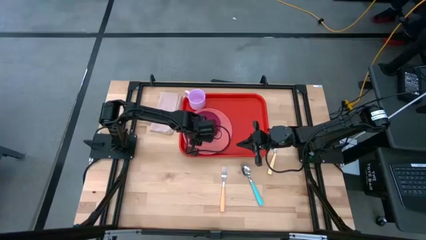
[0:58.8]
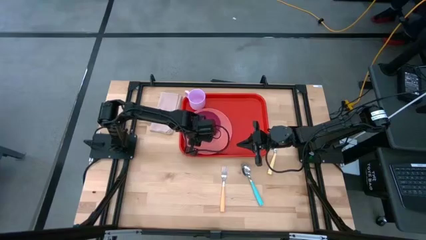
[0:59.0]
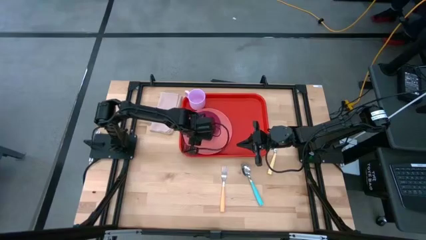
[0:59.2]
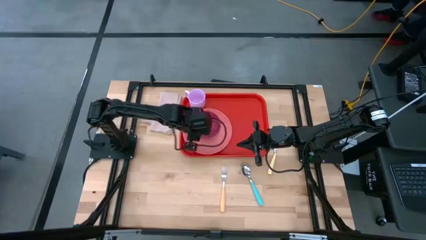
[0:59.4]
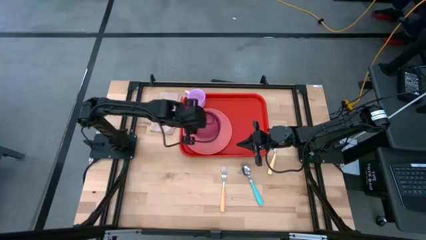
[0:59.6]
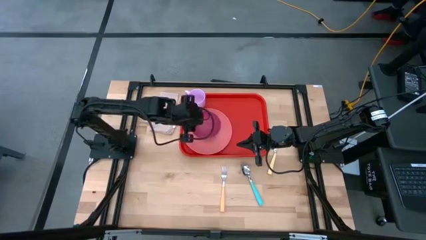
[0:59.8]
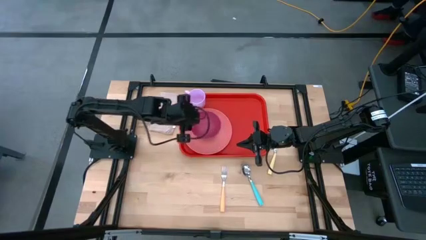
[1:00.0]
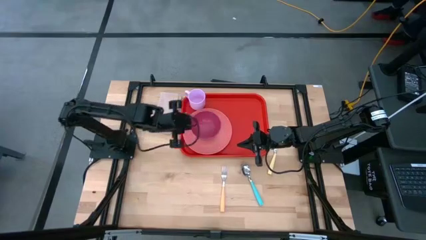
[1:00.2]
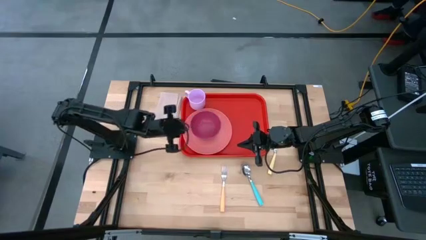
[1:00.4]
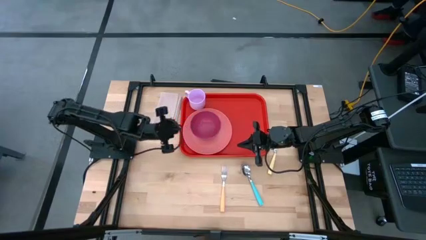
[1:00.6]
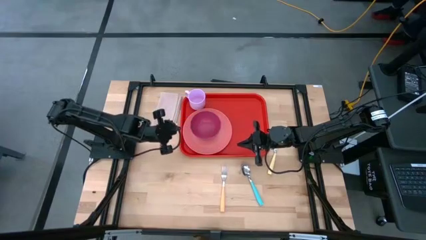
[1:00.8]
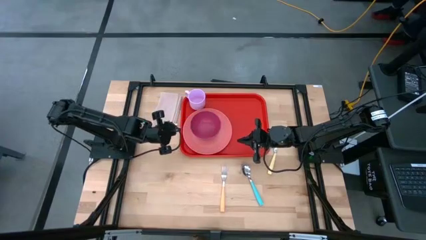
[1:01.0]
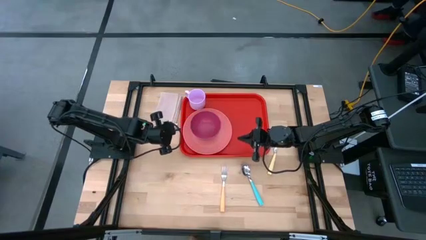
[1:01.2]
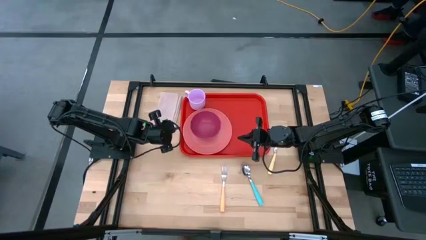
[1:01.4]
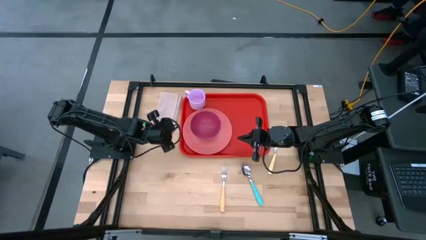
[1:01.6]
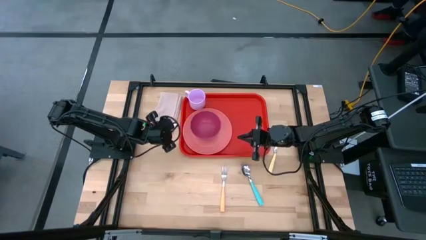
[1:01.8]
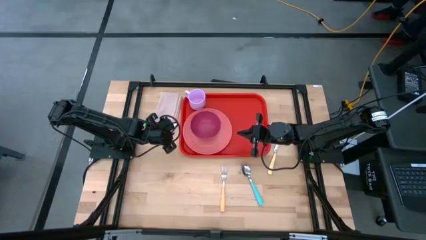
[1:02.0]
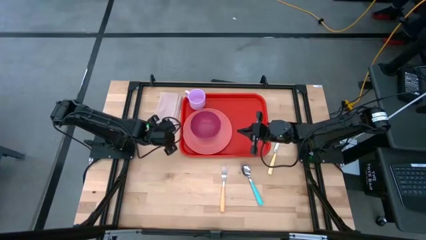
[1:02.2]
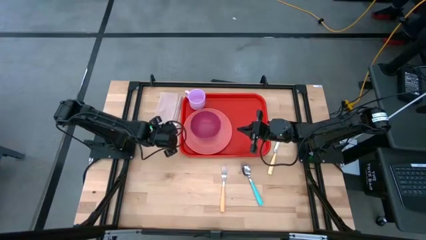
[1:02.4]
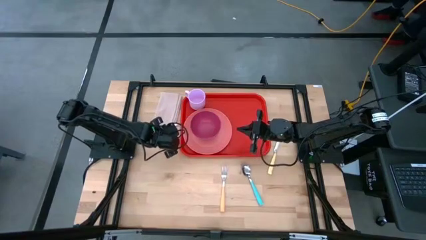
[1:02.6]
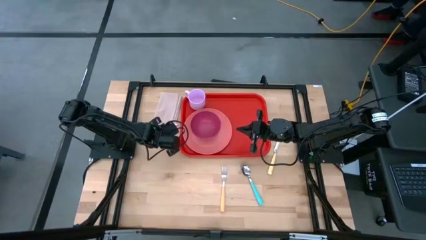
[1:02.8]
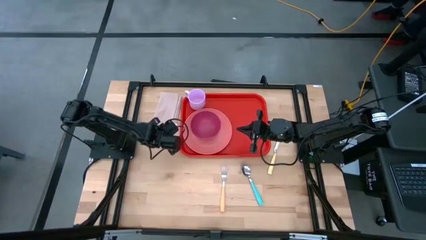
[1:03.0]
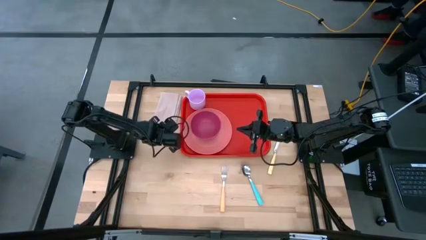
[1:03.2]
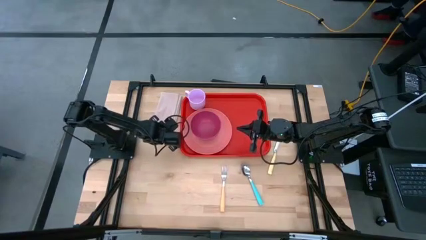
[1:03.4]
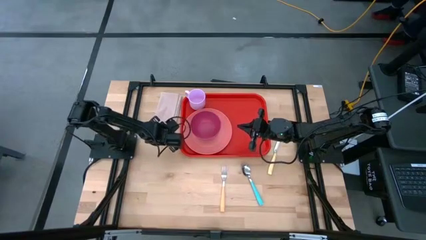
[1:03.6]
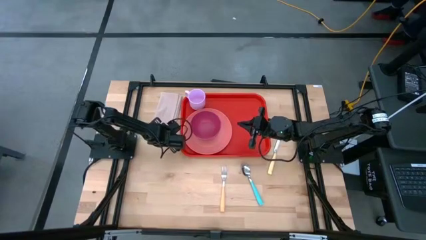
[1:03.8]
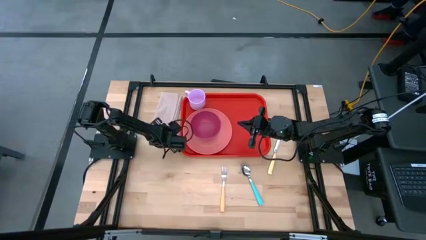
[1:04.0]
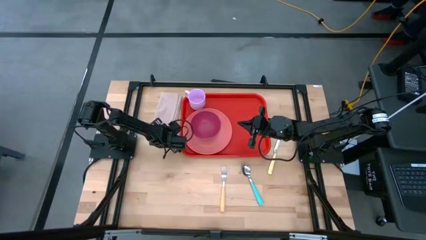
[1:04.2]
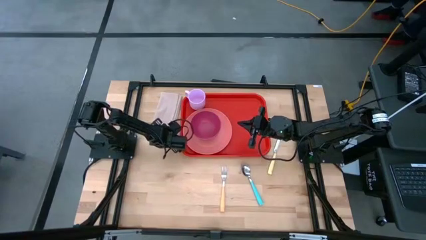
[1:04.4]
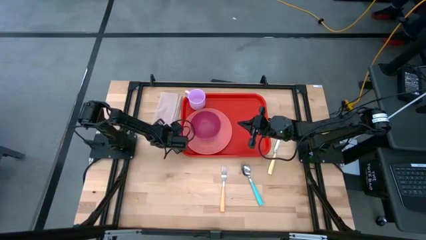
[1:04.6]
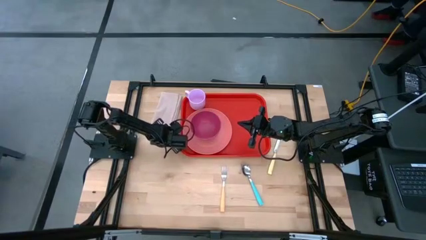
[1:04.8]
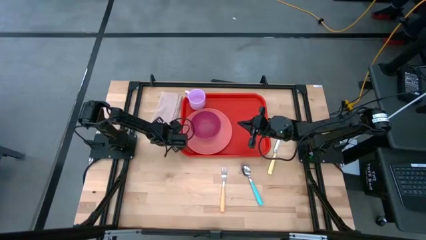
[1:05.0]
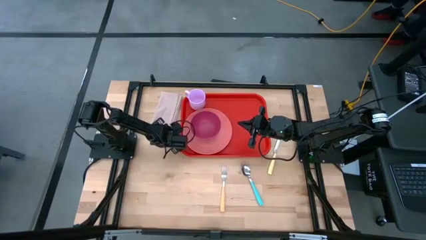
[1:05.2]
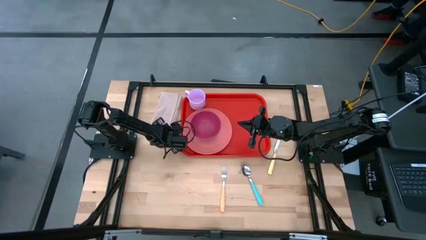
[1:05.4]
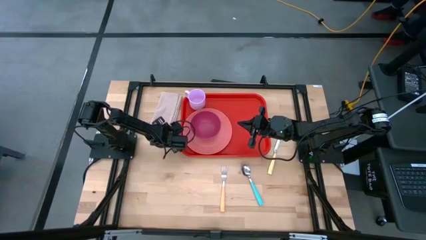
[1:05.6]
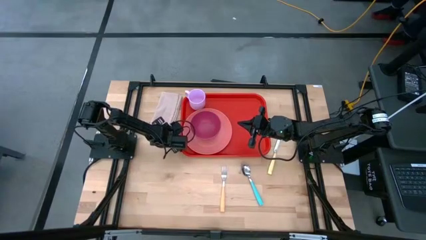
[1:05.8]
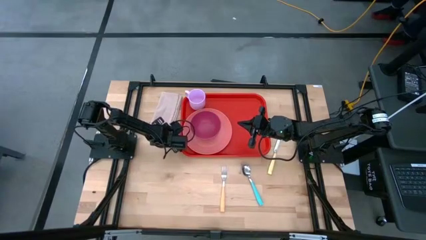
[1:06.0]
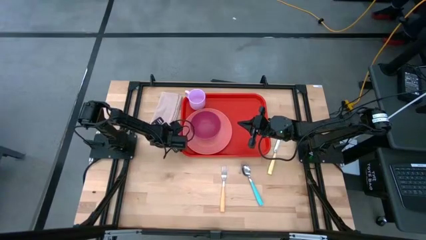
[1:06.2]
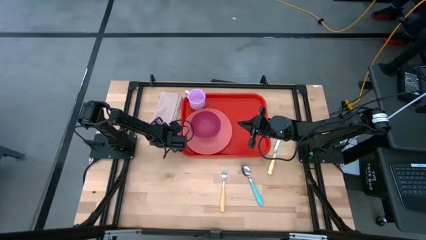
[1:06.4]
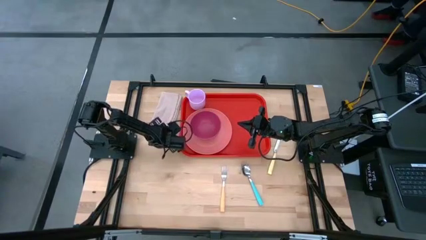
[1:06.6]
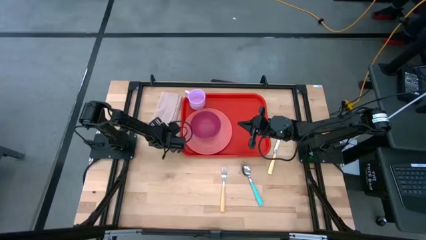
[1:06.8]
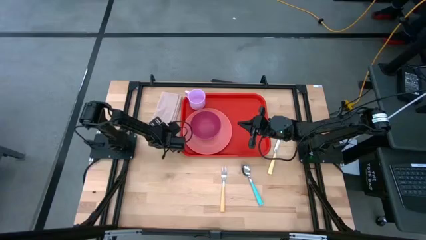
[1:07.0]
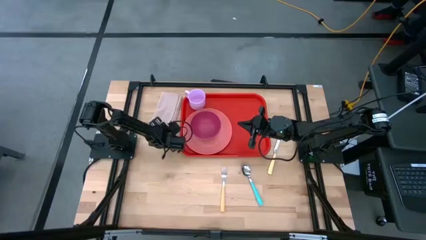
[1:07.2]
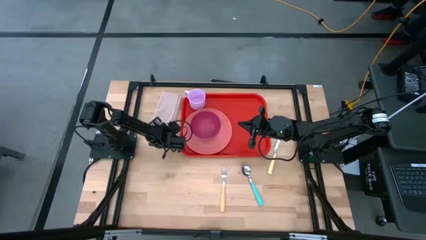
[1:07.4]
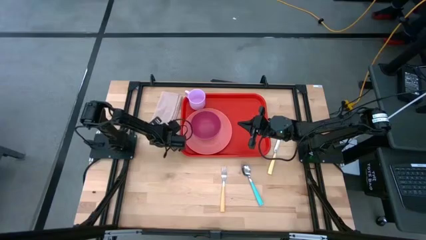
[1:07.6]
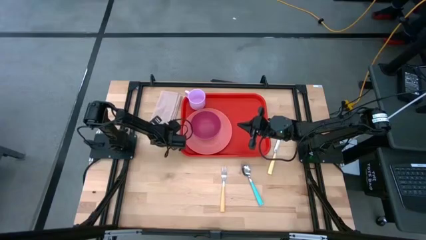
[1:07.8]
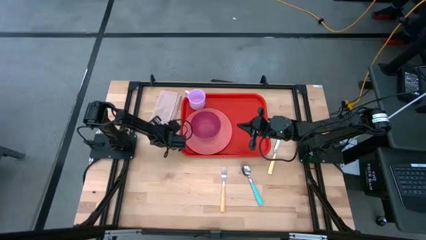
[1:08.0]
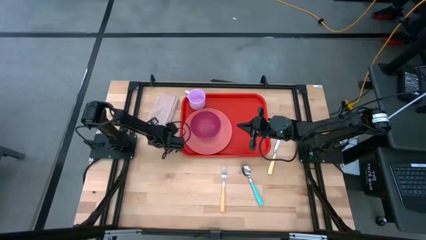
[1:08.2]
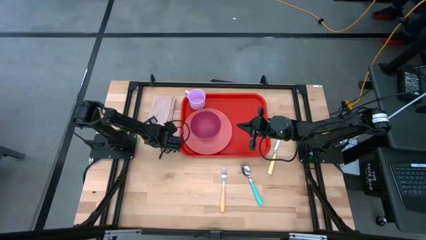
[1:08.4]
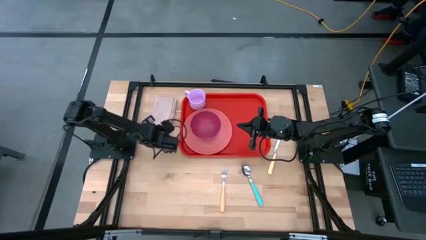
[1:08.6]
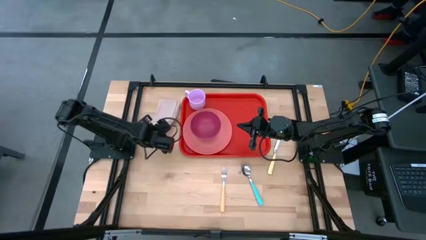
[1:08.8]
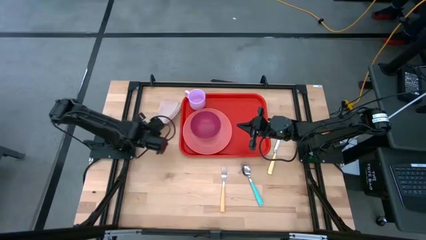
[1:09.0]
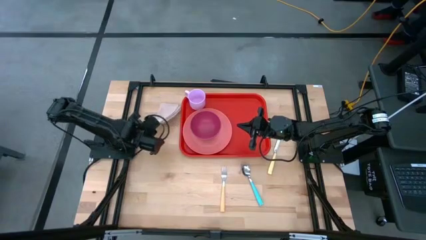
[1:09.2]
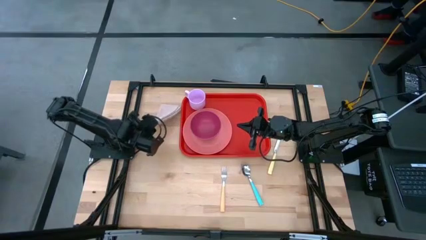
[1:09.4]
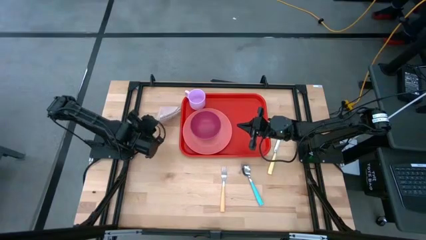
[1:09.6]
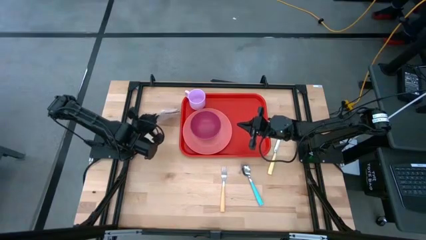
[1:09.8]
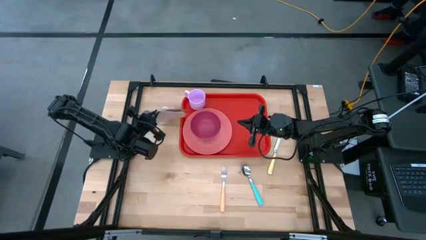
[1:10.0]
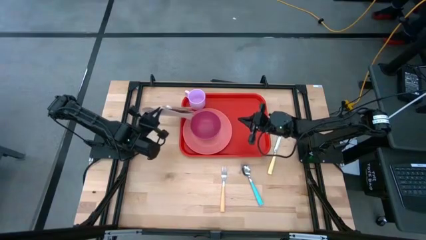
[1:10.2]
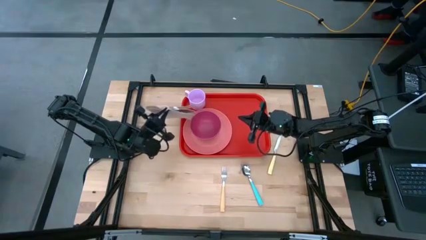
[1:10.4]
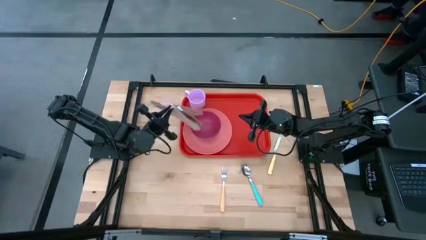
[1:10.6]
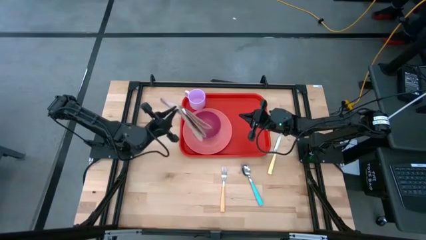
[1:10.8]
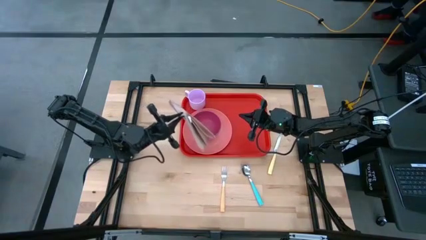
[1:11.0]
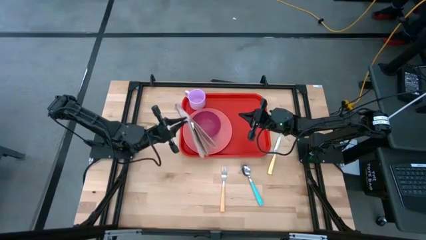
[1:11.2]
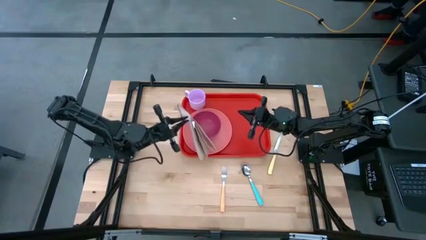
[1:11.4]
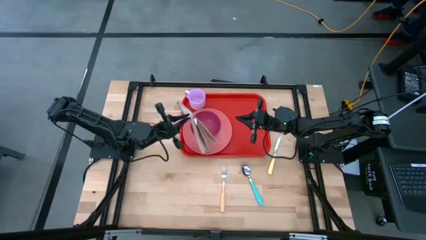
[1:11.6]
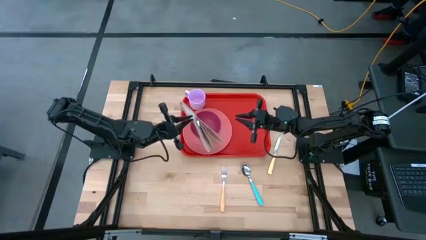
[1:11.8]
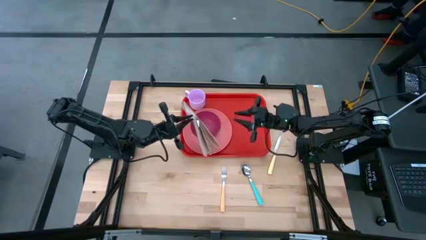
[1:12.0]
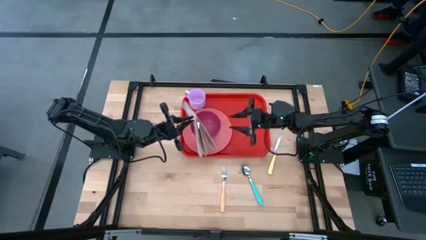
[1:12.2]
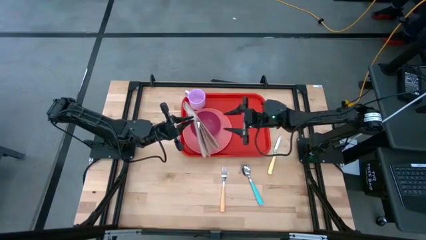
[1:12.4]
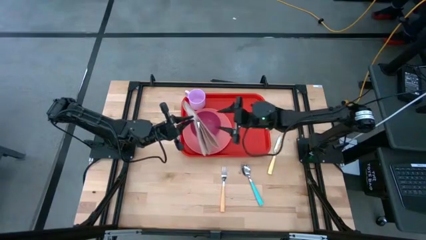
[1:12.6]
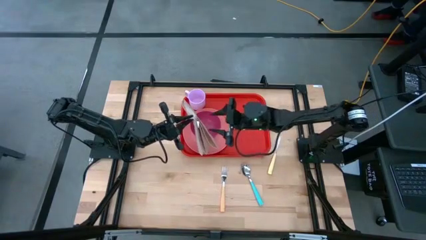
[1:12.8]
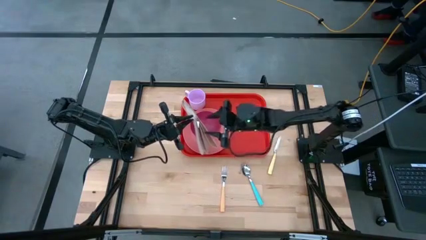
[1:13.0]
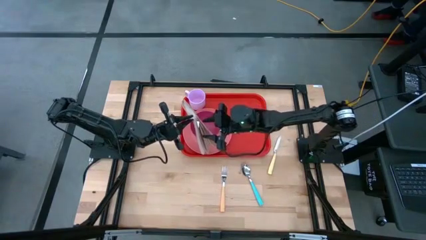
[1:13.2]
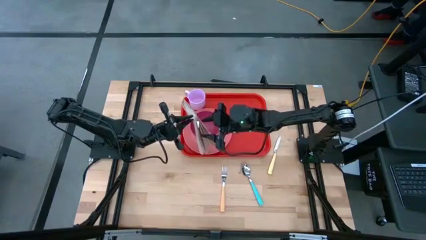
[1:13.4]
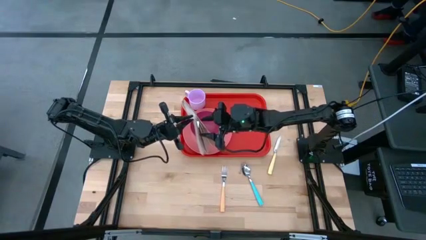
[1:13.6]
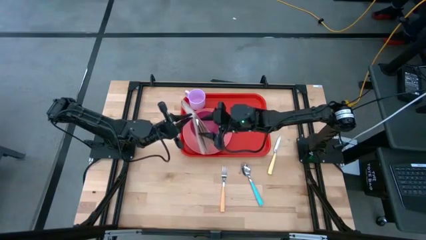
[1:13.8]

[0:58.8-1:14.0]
Task: Set up tray
Put the brown table napkin on the red tray to the right of the pink plate
